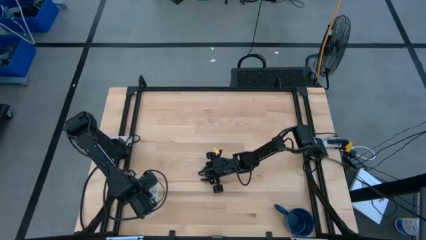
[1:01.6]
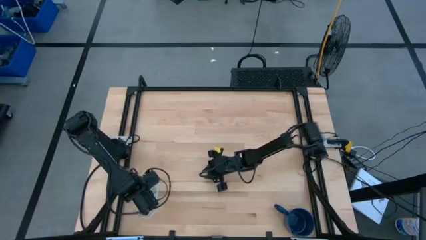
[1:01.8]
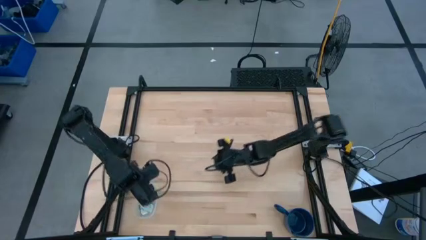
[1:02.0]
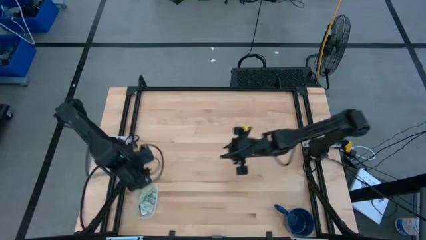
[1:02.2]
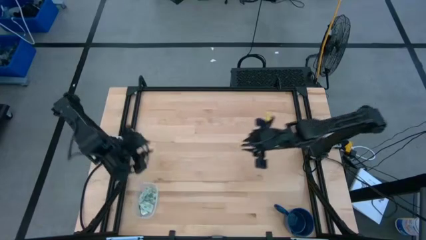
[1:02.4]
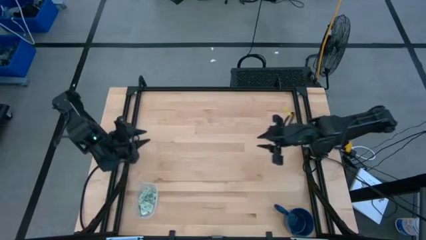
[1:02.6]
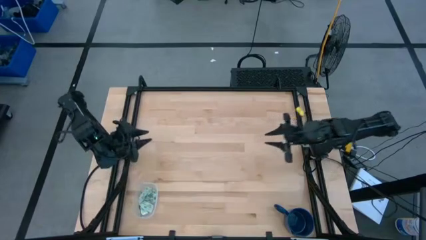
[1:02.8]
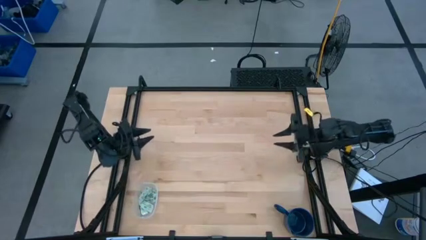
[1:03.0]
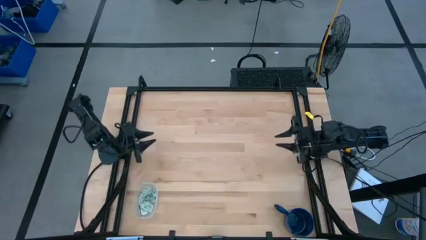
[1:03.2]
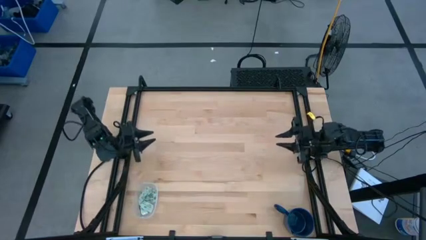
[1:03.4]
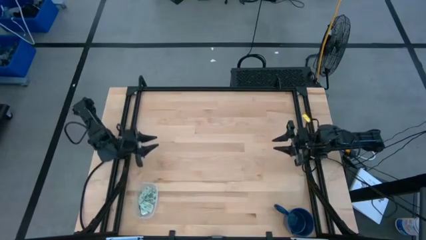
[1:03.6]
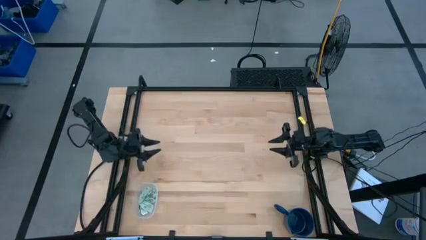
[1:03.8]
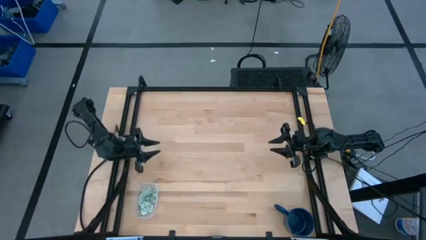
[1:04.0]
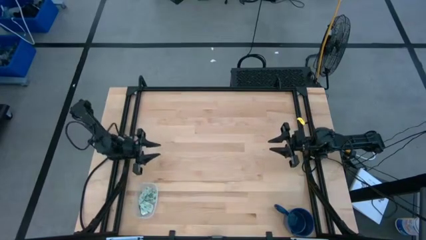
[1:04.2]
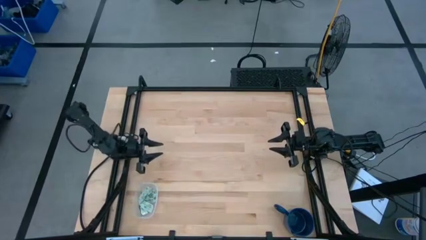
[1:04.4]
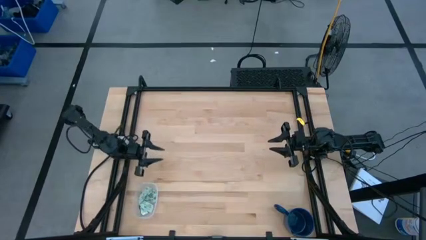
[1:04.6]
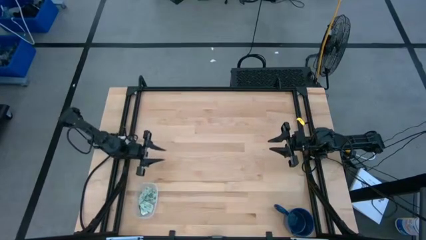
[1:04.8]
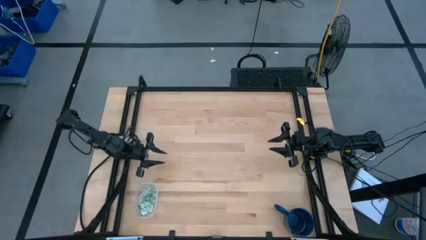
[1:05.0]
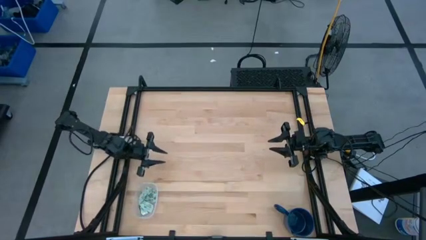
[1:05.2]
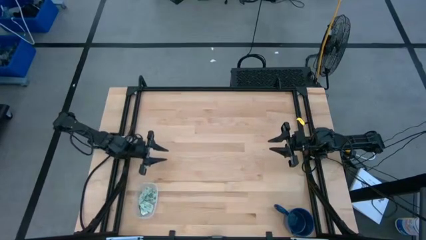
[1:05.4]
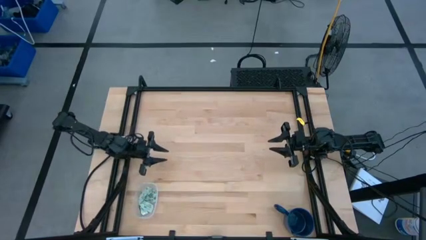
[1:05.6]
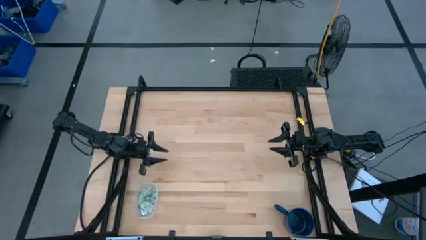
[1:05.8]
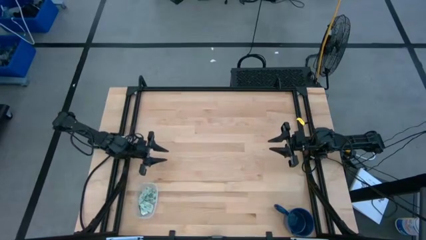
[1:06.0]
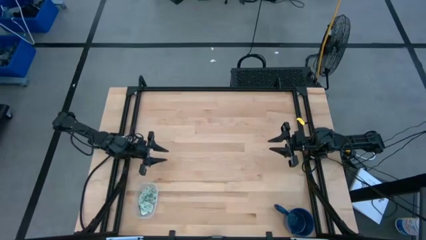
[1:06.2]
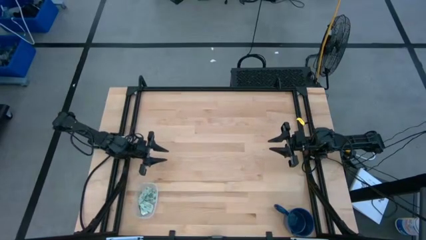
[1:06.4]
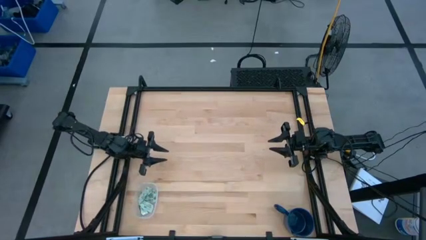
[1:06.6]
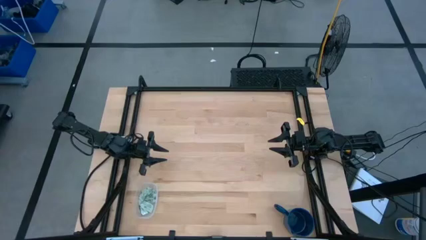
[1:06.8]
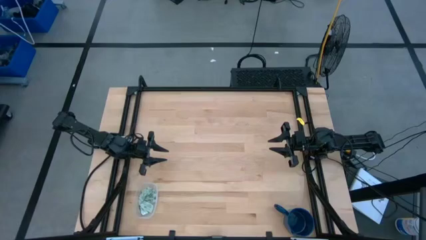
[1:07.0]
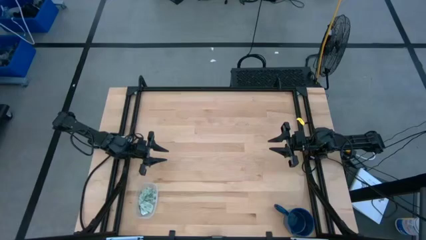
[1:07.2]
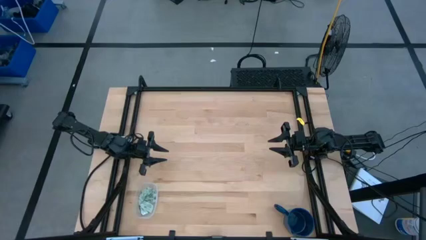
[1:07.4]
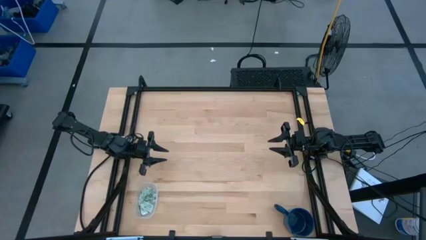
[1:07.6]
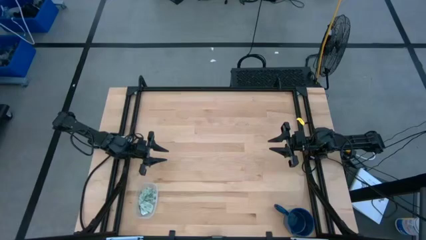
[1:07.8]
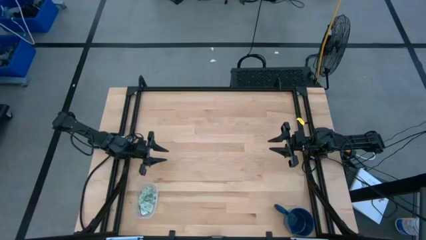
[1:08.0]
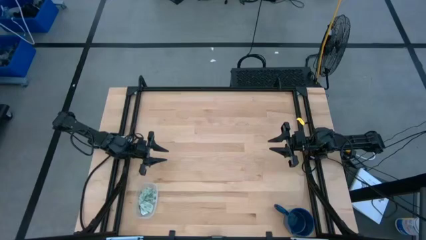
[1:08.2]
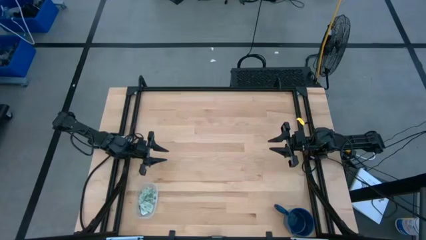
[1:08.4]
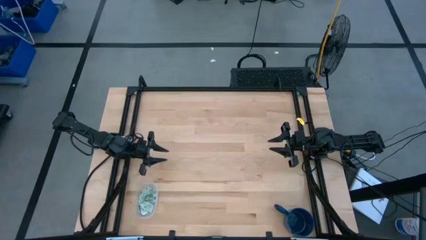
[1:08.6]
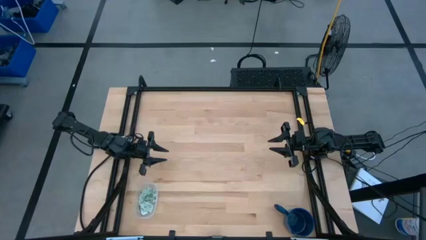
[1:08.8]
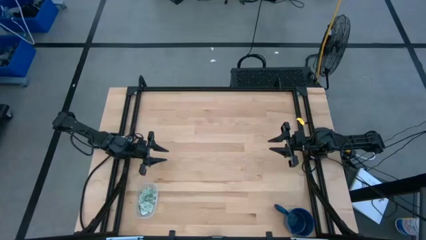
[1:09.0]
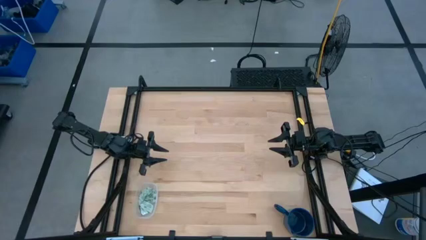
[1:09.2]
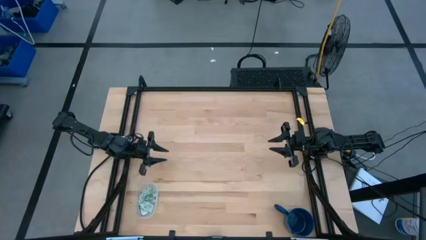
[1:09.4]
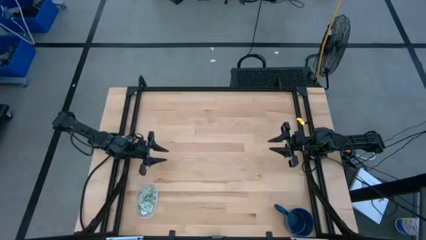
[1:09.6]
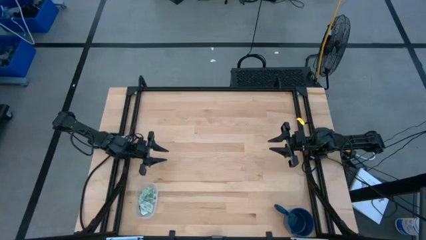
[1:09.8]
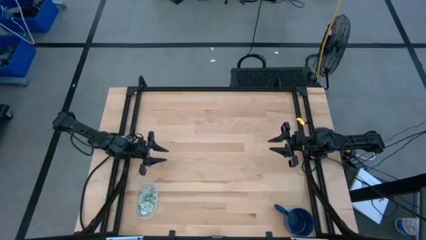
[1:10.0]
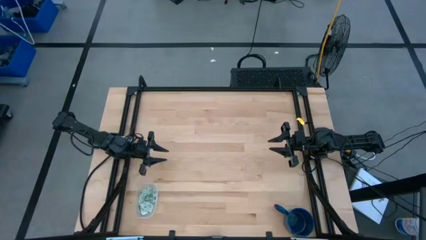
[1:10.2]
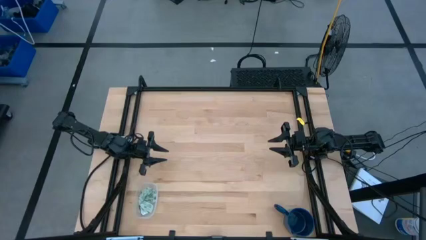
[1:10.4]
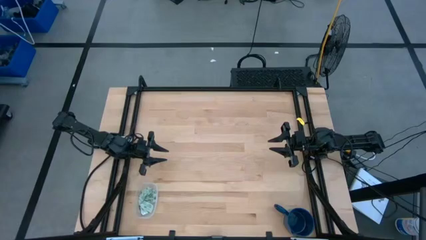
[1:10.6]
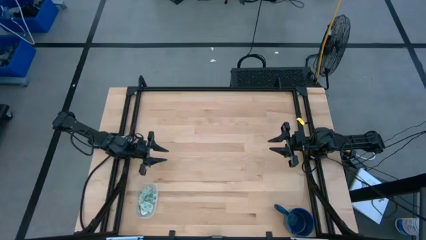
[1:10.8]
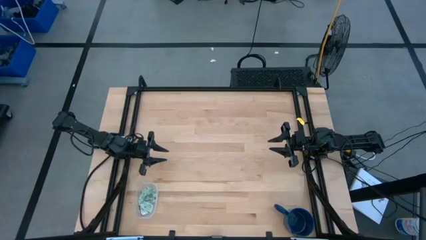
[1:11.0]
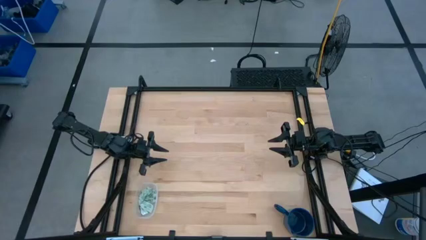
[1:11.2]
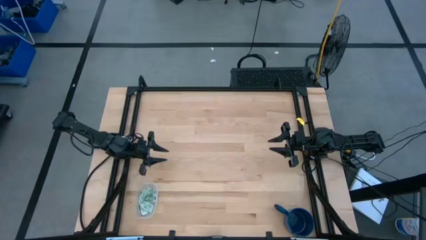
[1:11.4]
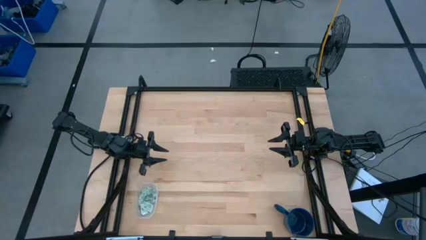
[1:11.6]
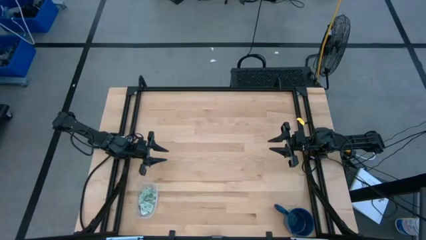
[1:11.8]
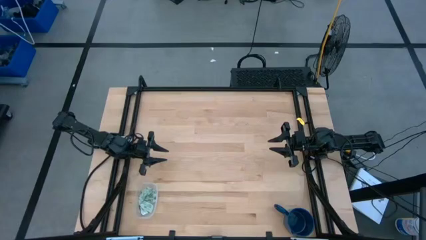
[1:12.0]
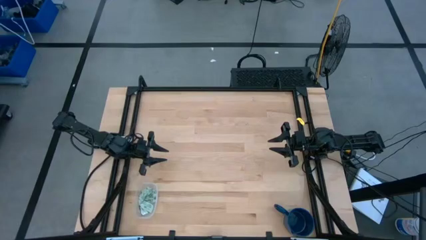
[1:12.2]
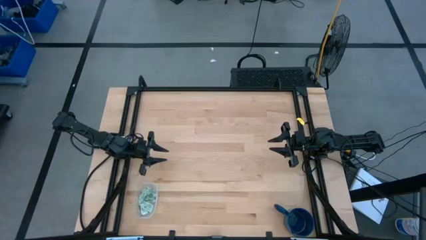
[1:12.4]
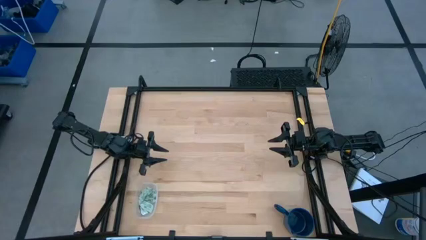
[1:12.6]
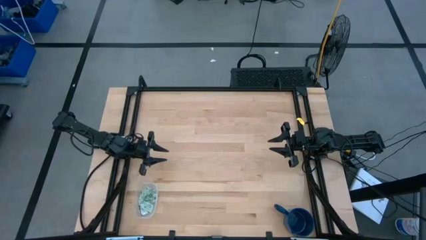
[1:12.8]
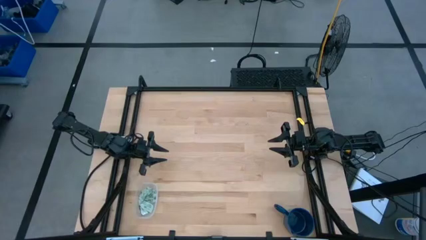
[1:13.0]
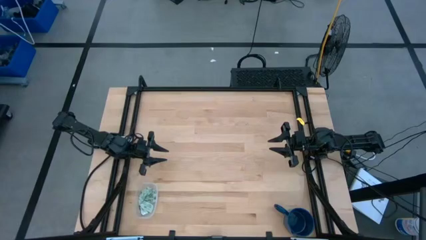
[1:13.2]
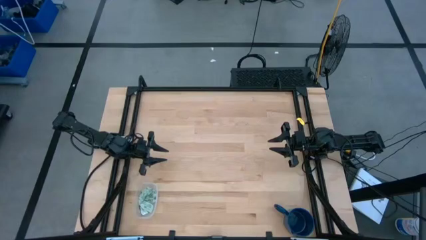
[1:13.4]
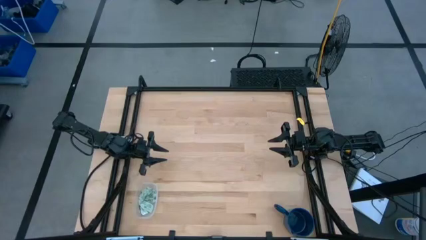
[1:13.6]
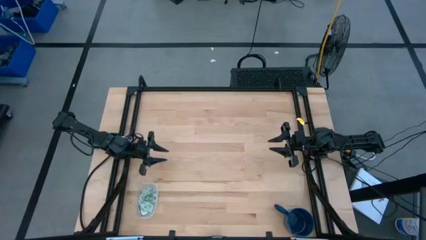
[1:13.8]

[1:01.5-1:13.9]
Task: Pick and place Stevia / Truvia into bins
Return to Home Position

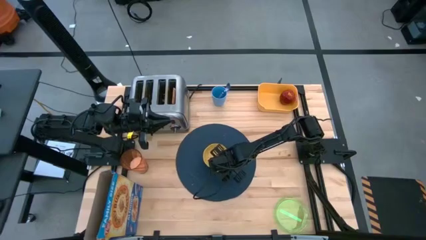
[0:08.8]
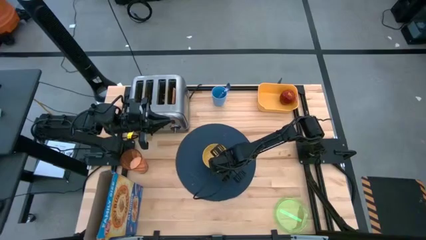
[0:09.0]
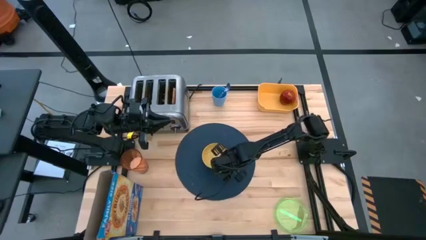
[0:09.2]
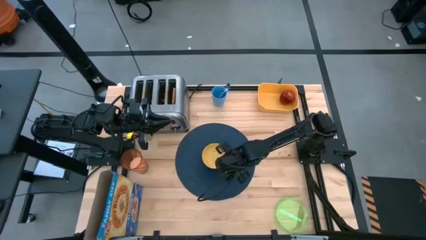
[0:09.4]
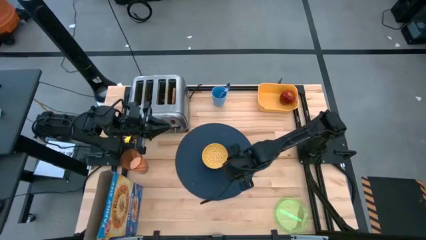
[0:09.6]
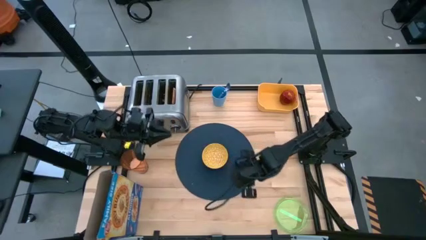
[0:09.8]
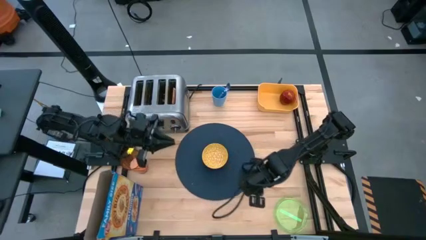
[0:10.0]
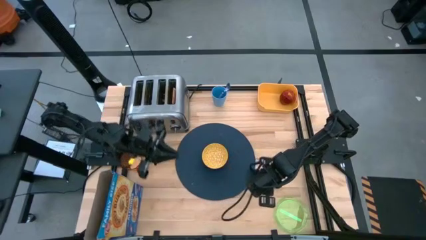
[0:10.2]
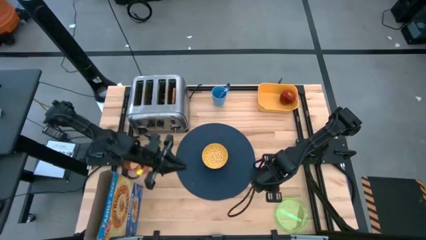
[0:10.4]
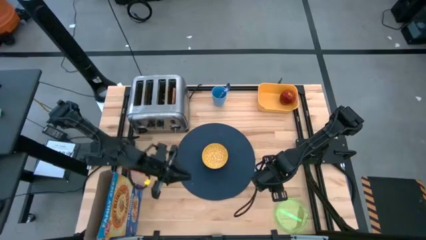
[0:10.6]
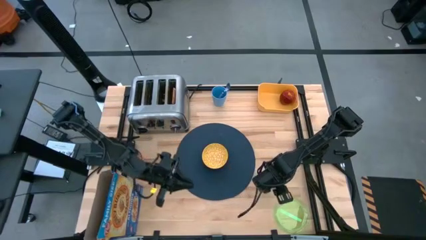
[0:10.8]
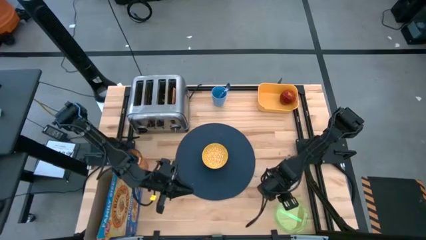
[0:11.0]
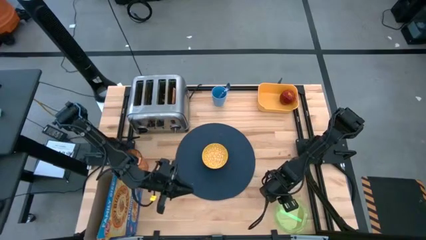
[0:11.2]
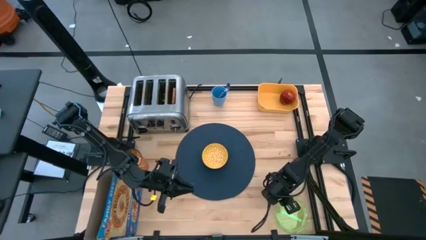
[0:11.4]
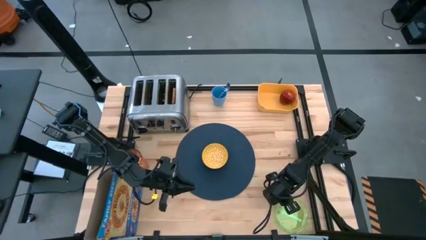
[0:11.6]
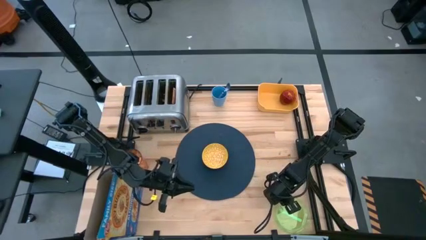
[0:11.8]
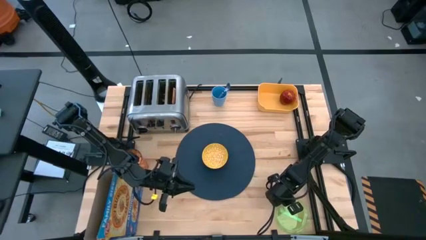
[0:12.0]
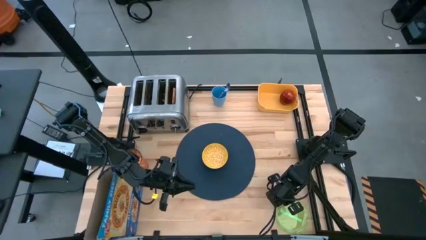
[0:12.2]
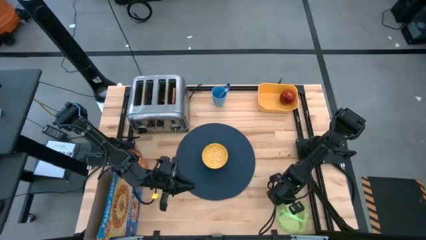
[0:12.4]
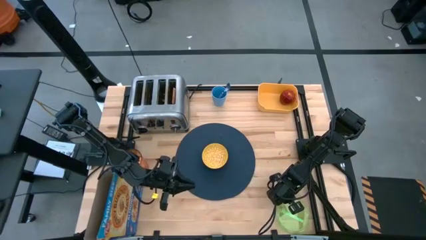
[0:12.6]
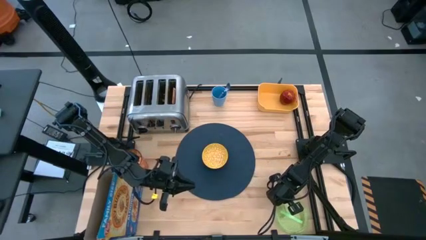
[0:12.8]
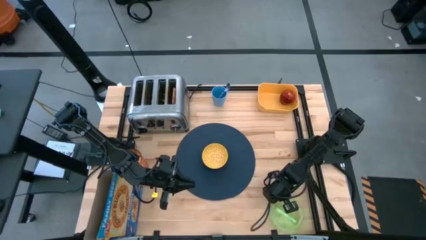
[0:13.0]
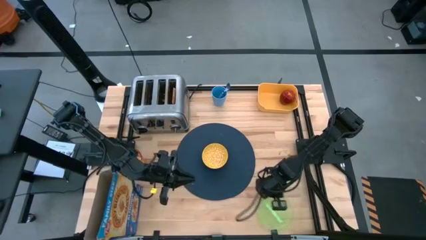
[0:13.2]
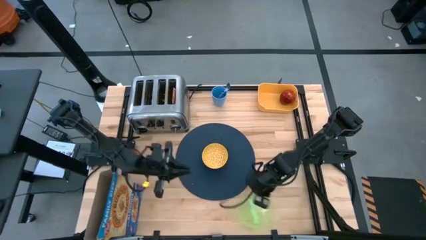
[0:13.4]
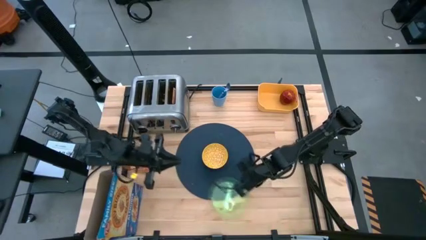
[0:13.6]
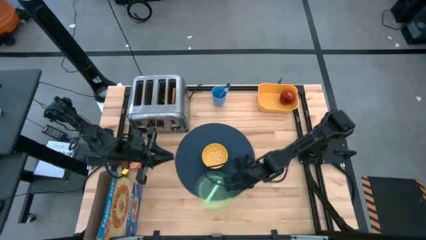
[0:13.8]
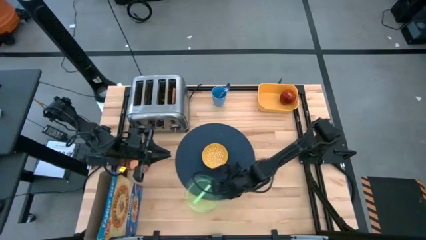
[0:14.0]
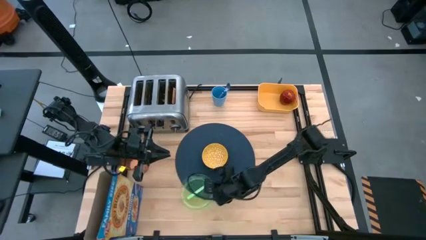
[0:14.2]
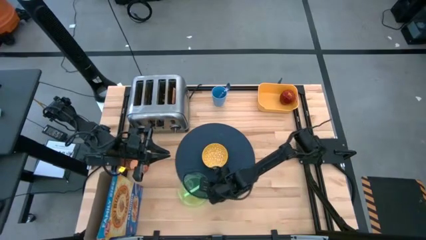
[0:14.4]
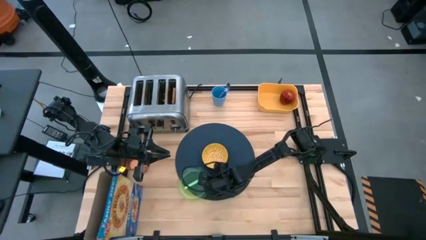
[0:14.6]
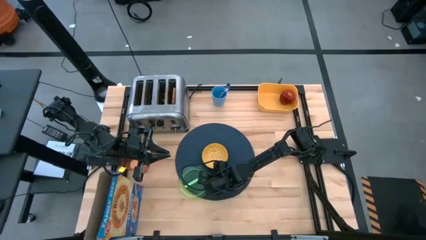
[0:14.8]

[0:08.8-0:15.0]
Task: Arrange a breakfast setting
Put the transparent green plate to the bottom of the yellow bowl on the placemat
